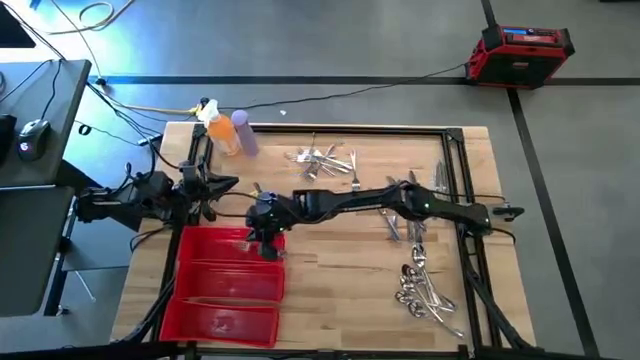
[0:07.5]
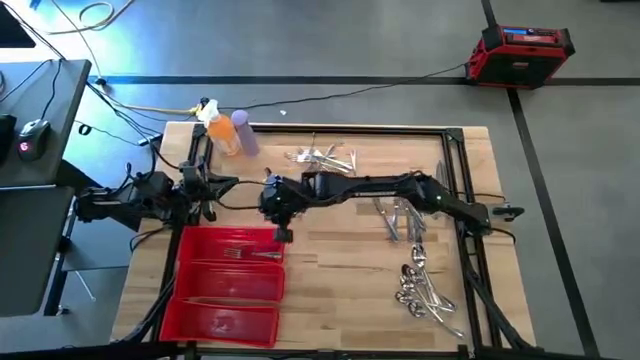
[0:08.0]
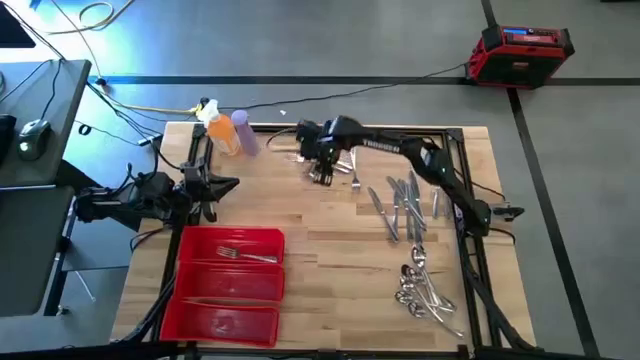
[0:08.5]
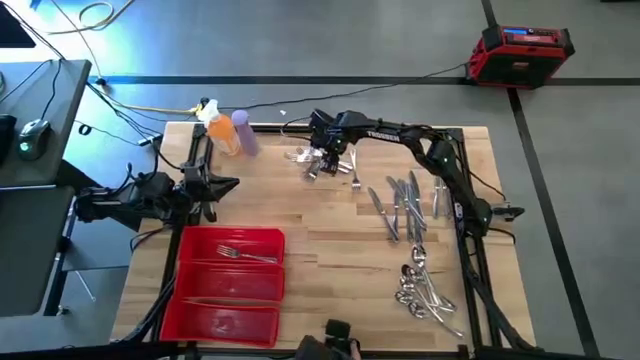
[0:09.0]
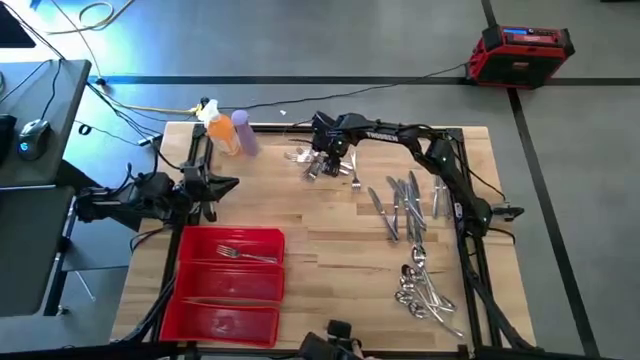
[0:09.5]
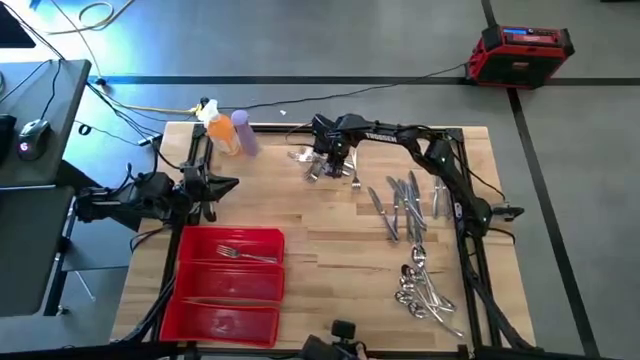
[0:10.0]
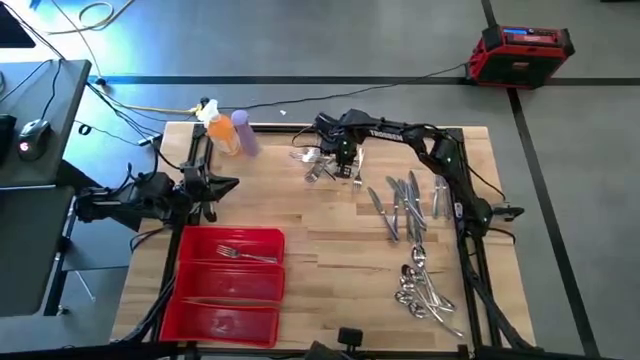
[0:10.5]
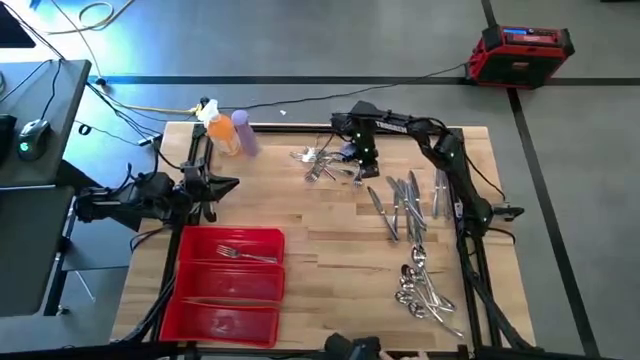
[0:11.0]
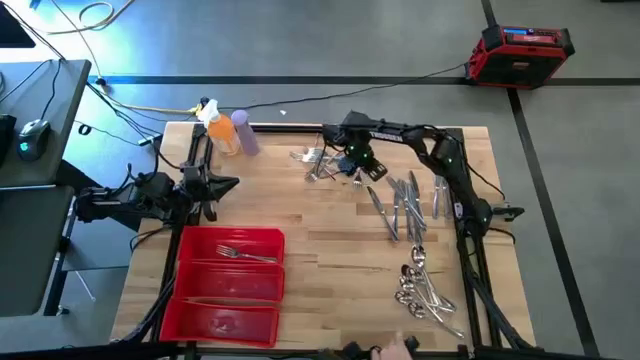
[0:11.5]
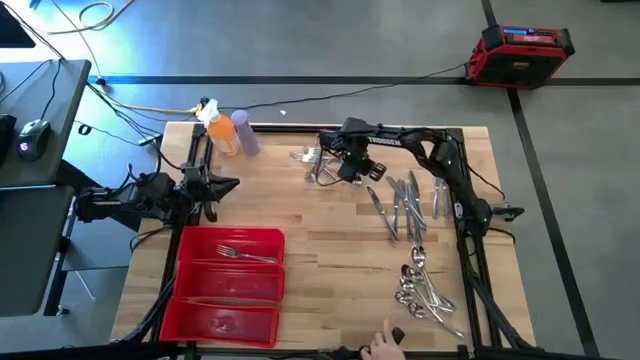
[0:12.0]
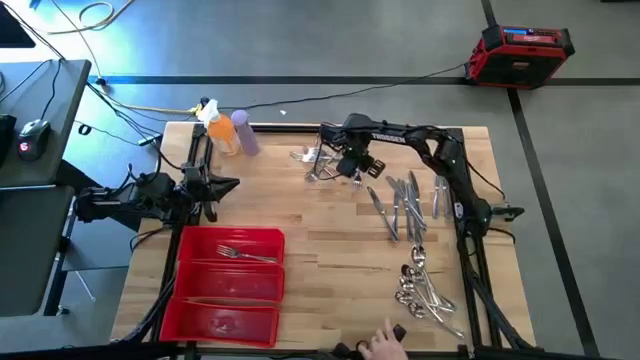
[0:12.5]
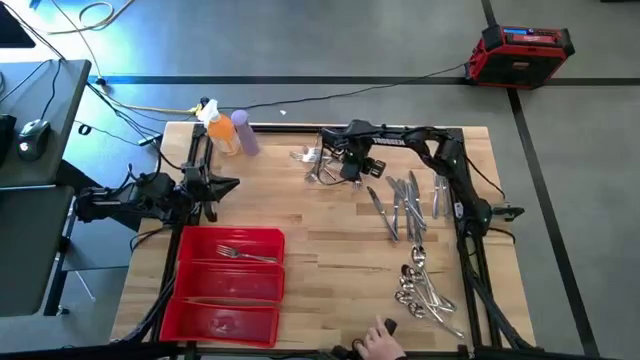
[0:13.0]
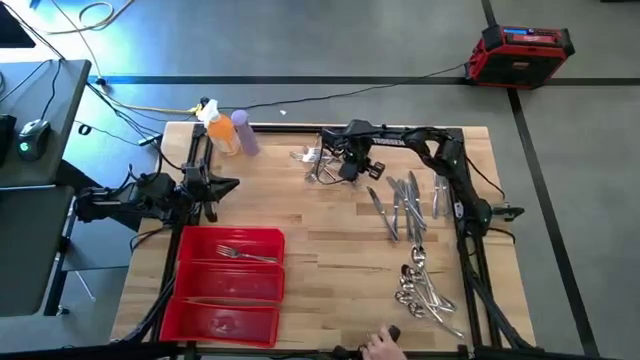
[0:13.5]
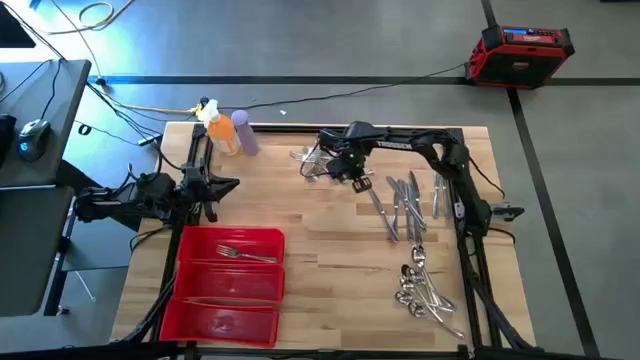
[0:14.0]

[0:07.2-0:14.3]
Task: Sort silverware
Put the silver fork in the top red bin

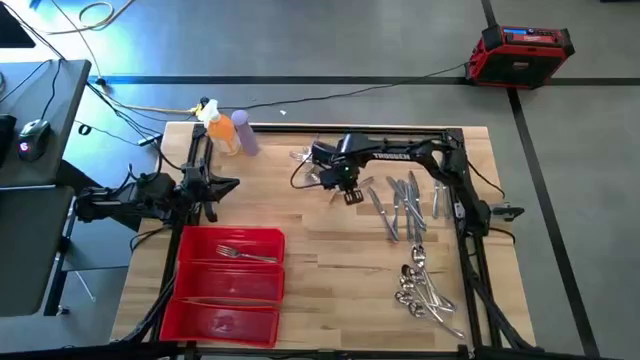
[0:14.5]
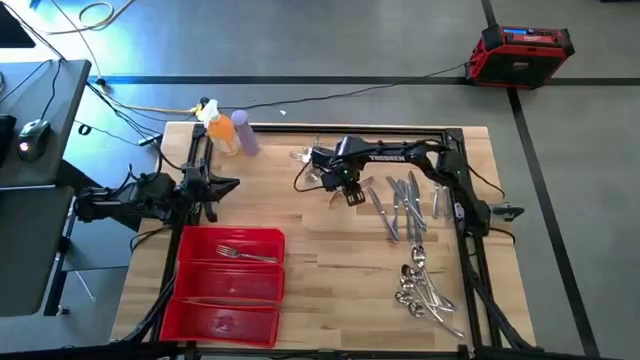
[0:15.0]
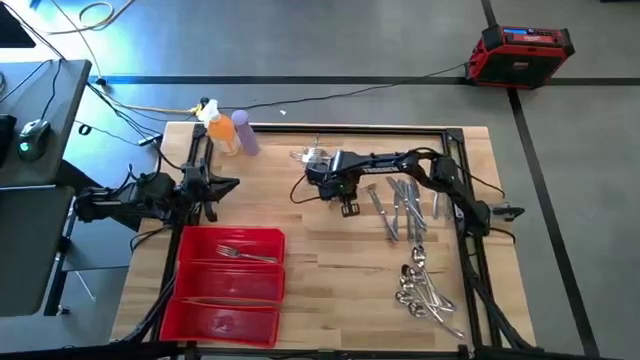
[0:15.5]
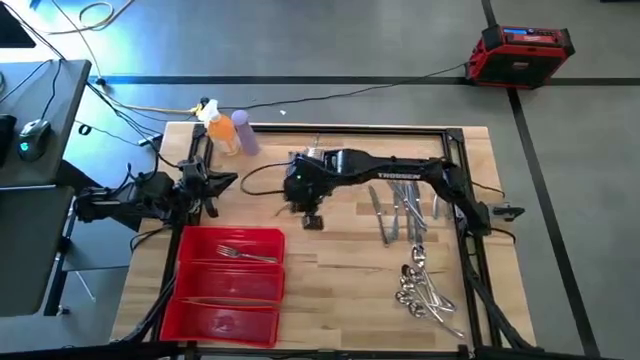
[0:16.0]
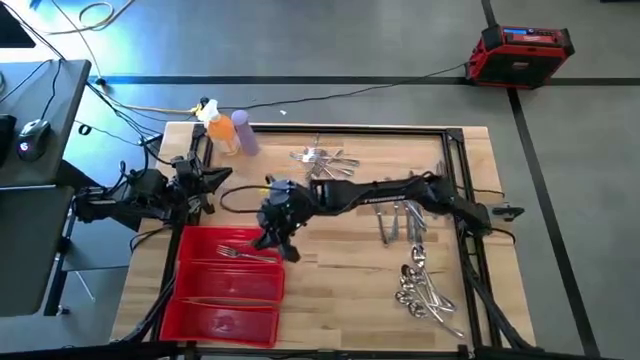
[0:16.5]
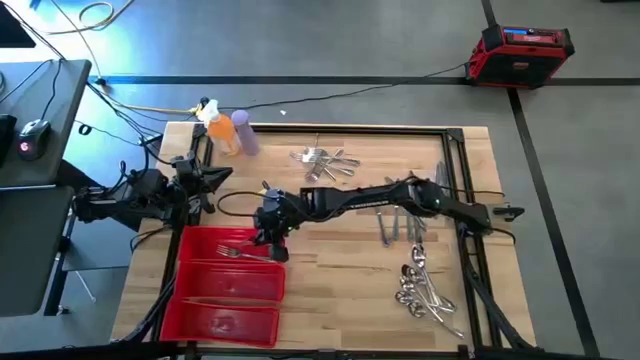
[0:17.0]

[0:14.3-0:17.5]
Put the silver fork in the top red bin

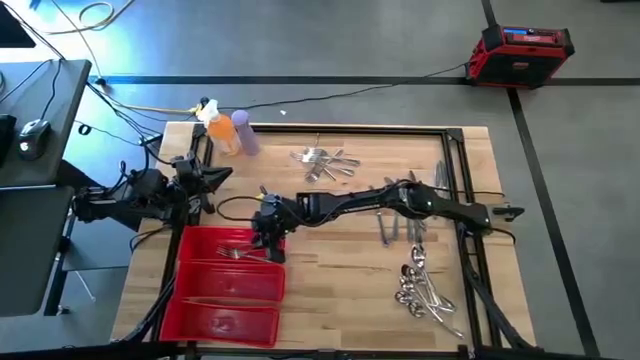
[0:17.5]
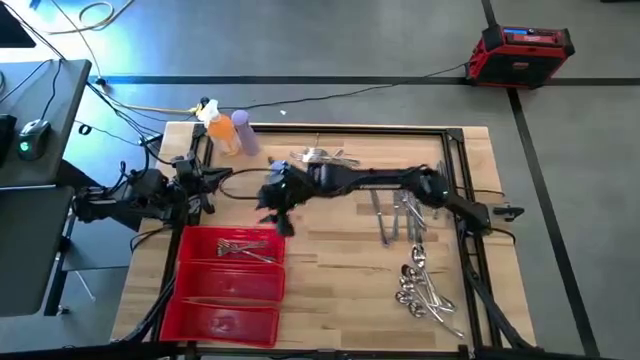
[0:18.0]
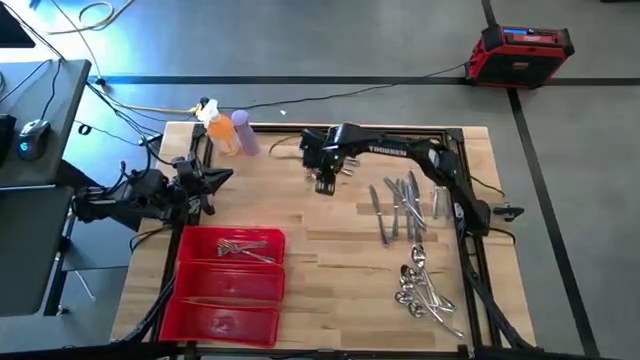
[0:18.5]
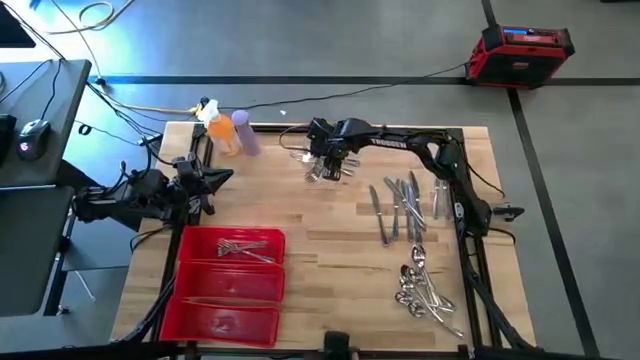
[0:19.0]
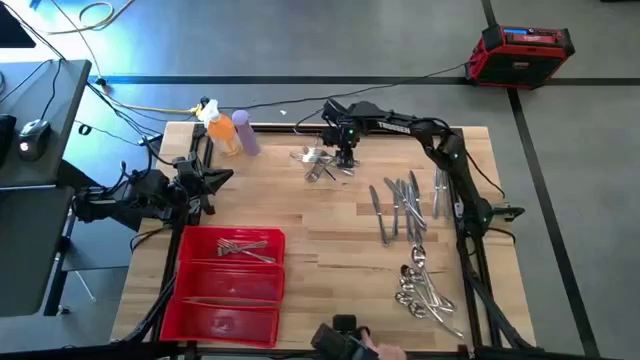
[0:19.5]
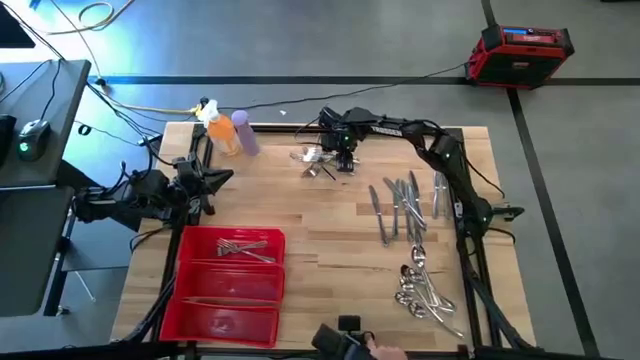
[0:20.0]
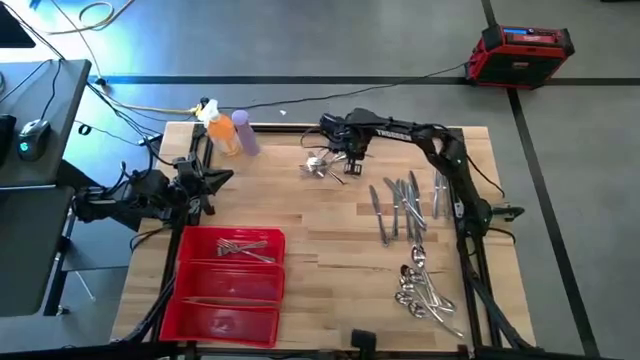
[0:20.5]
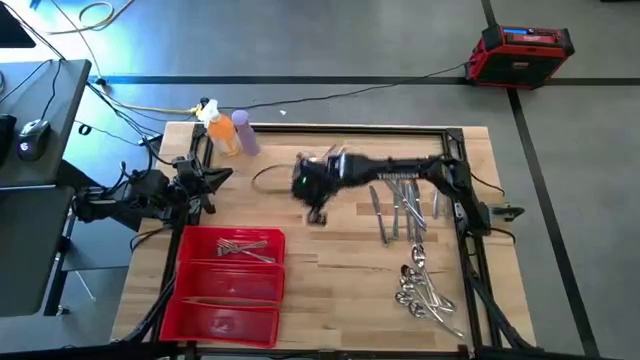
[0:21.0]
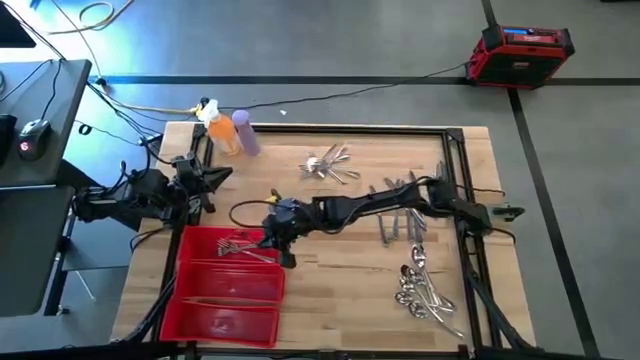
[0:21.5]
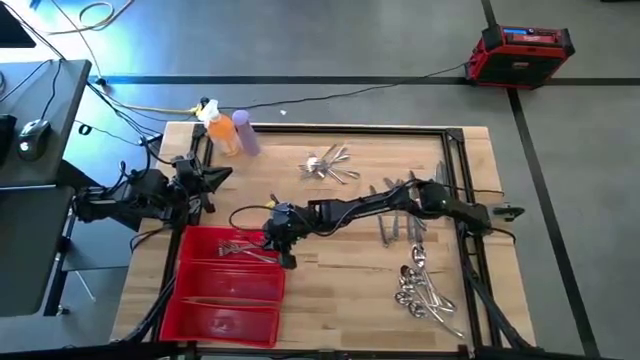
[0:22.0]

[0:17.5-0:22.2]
Put the silver fork in the top red bin

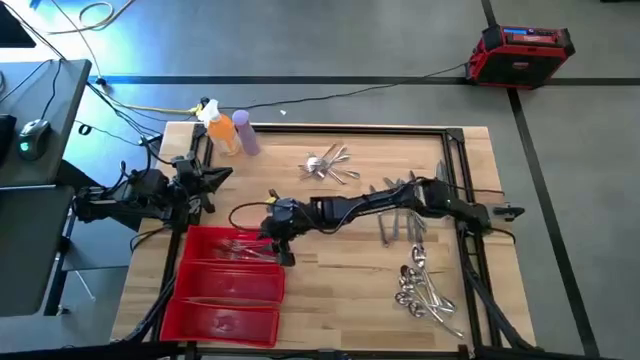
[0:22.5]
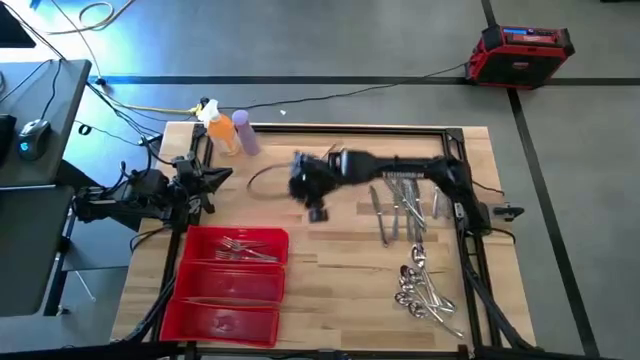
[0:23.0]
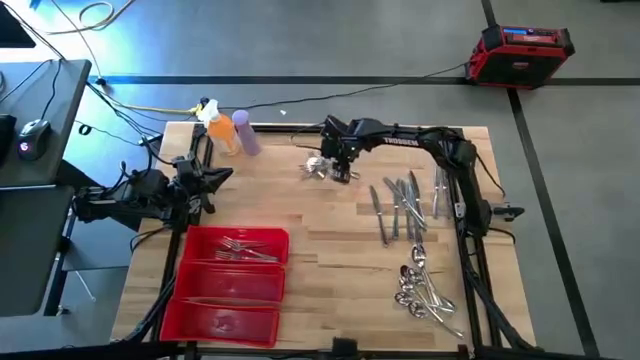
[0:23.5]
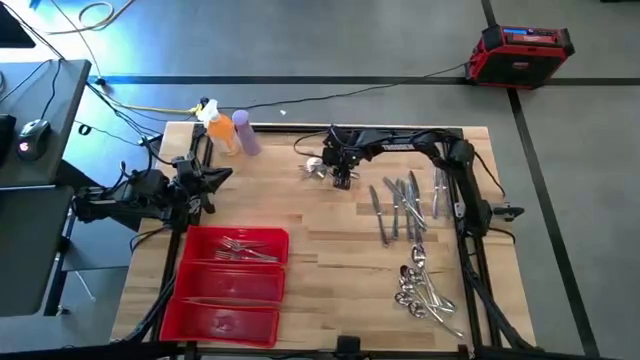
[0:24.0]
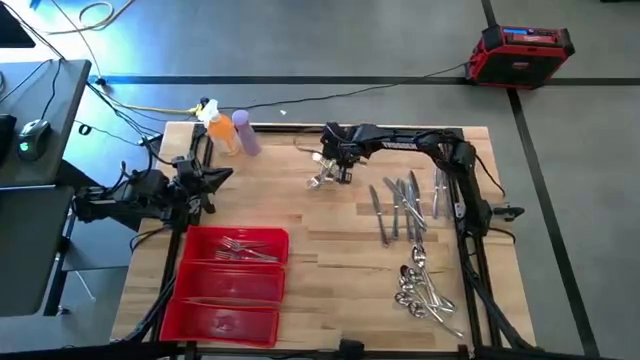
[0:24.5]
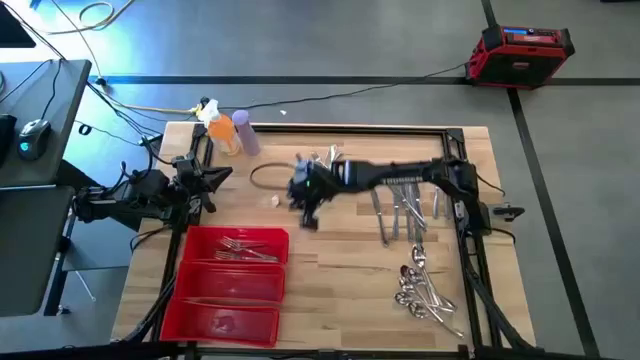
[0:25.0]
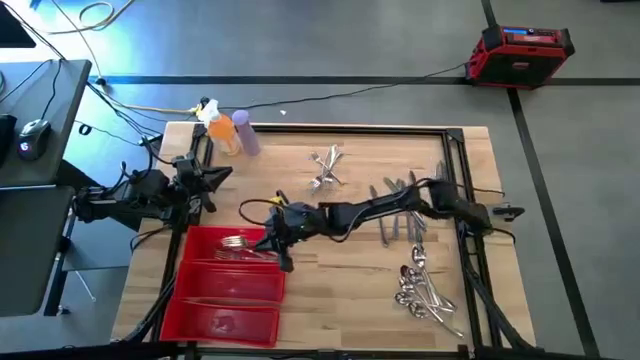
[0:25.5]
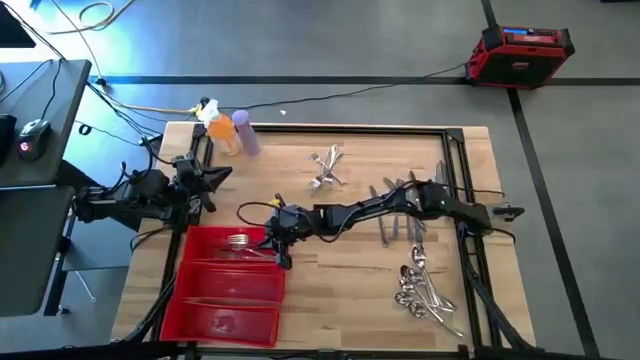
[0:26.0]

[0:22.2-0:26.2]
Put the silver fork in the top red bin

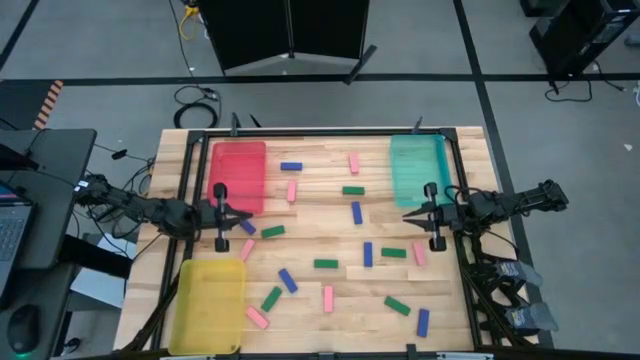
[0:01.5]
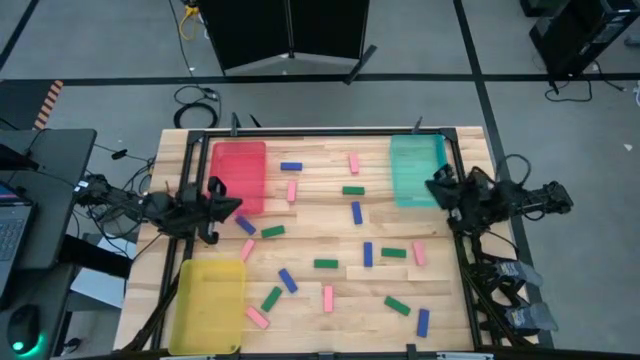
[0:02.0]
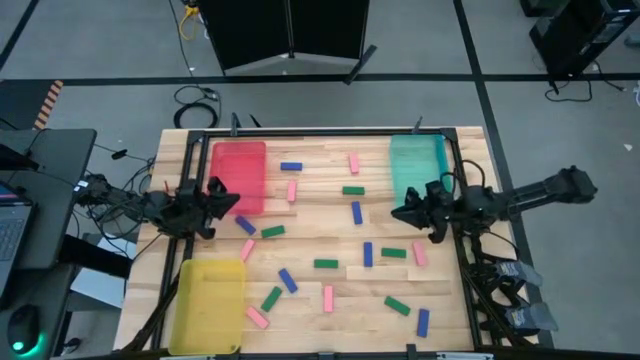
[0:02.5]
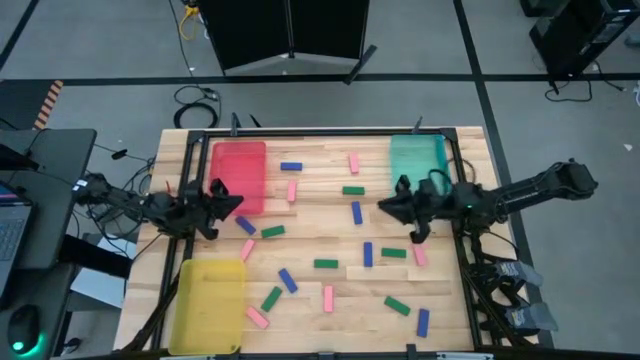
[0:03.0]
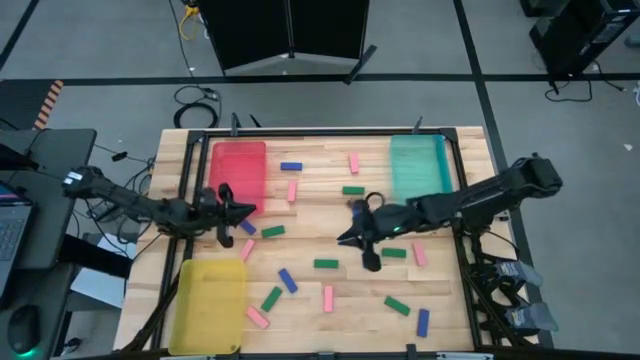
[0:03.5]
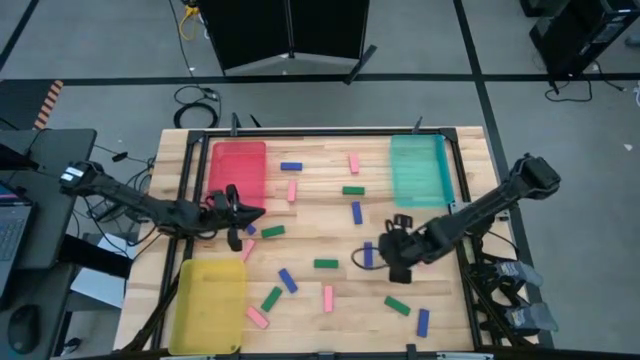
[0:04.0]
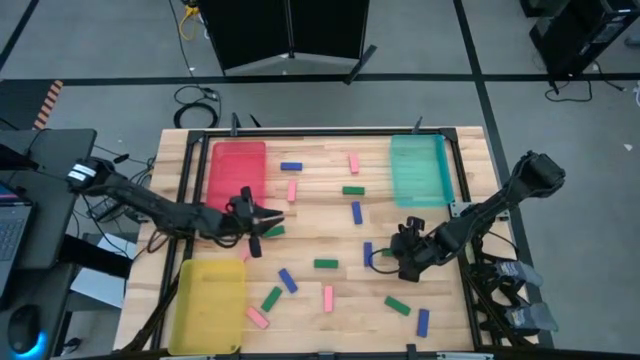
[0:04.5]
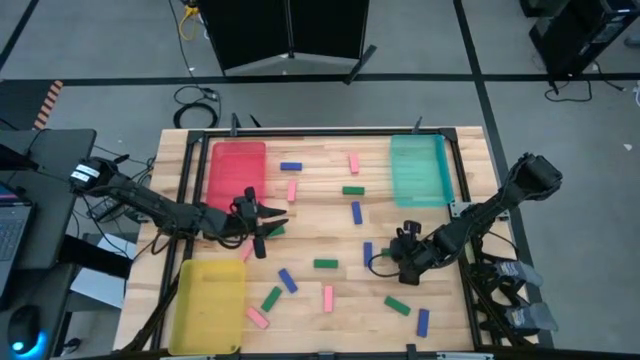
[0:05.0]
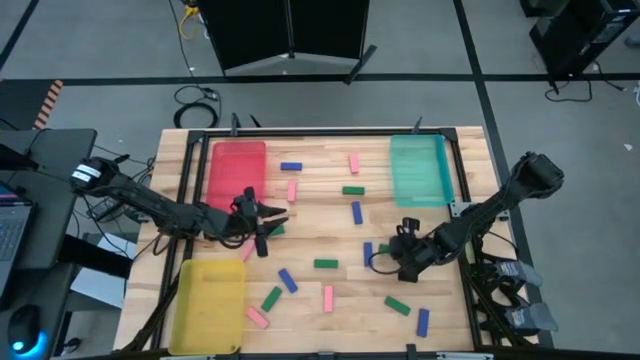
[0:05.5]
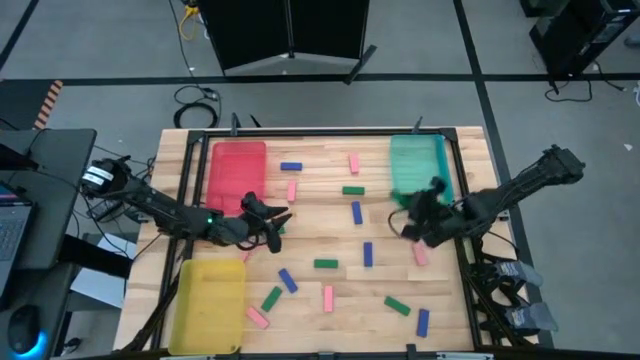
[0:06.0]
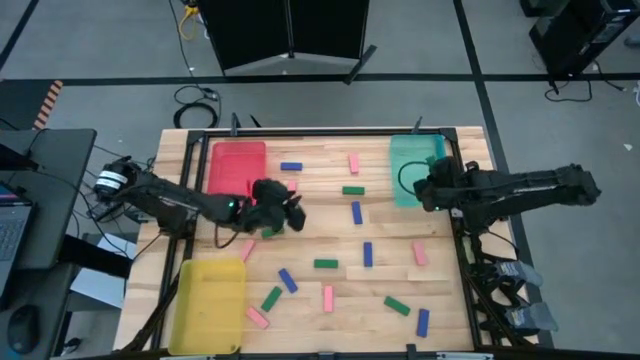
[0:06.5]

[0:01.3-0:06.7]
Task: Sort blocks
Put the green block into the blue bin
